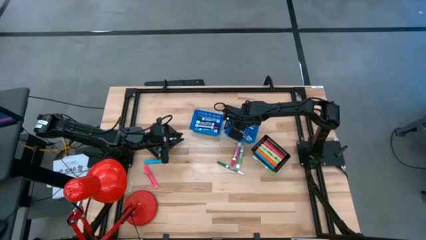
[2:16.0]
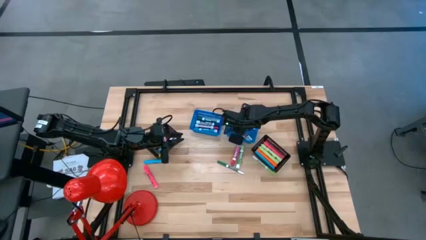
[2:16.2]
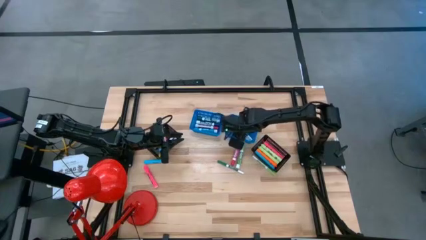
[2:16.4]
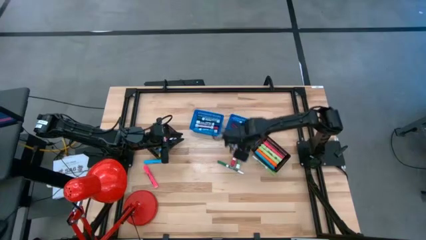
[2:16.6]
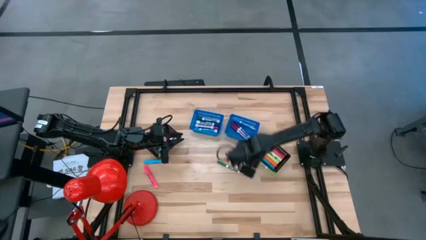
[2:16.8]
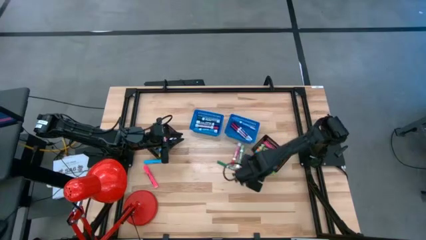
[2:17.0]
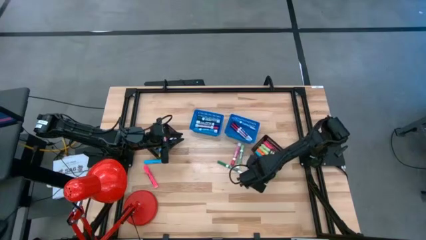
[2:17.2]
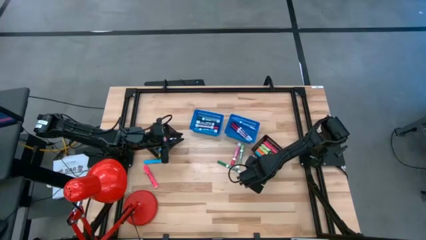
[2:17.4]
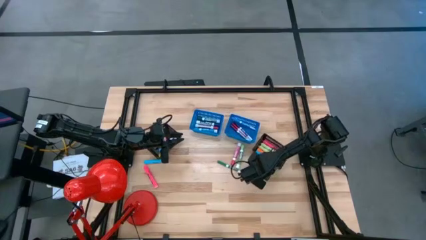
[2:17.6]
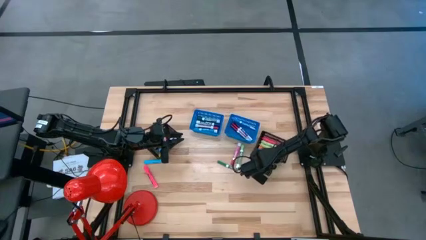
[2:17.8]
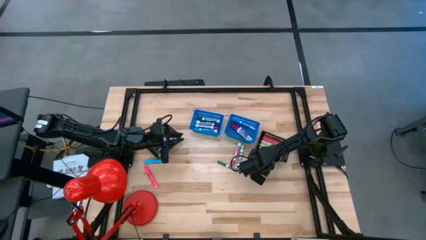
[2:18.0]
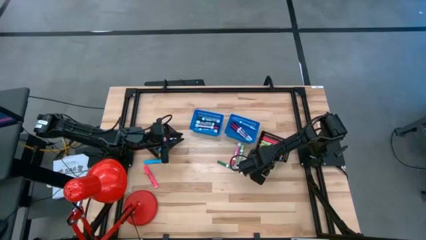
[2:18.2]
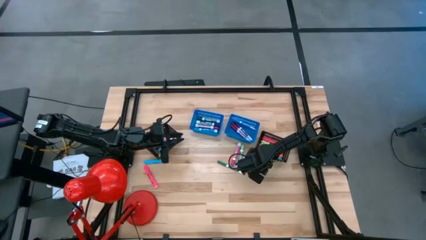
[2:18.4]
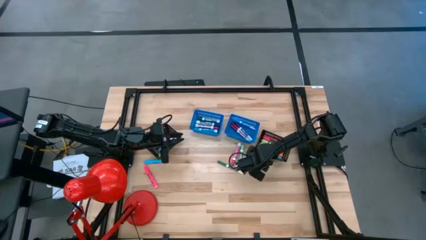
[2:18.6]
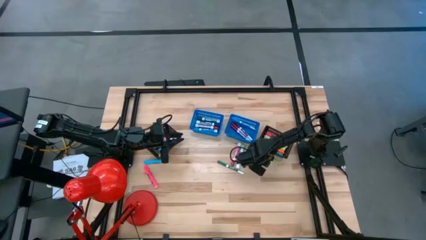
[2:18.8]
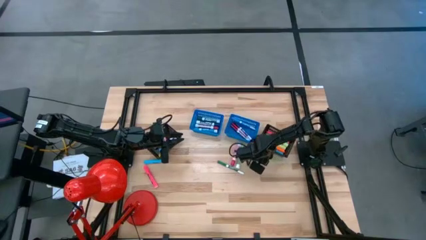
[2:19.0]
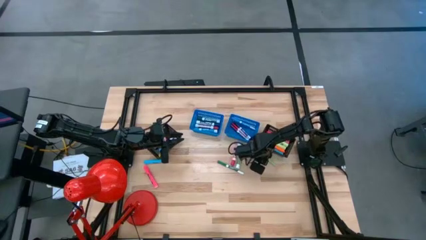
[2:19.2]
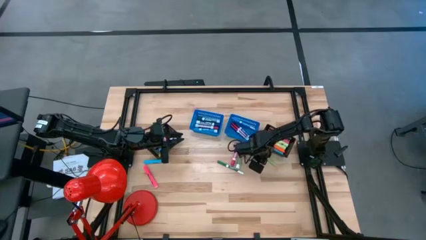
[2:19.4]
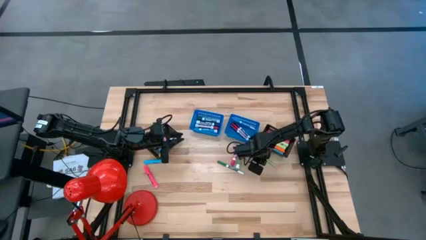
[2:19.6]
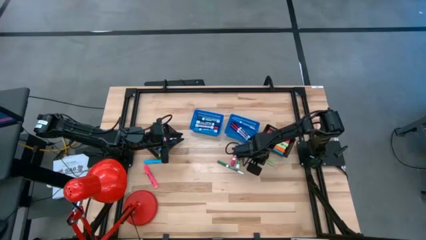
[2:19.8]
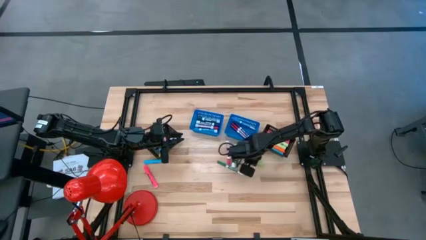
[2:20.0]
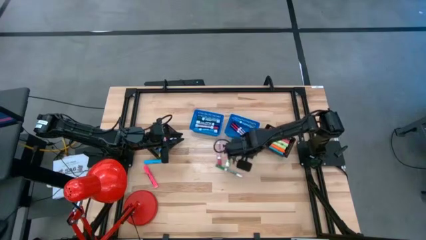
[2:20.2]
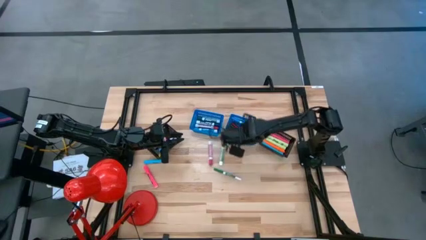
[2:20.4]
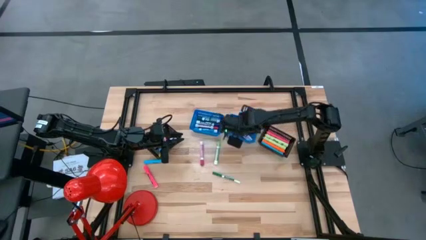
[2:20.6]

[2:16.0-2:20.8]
Task: Pick & Place Markers
Put the light green alcohol marker into the right blue bin

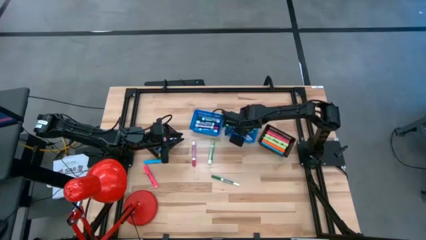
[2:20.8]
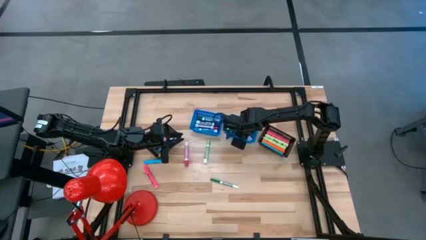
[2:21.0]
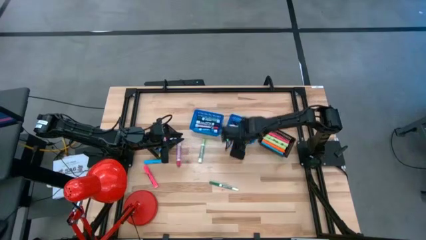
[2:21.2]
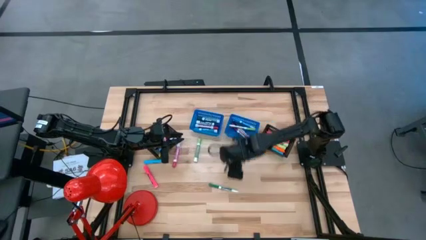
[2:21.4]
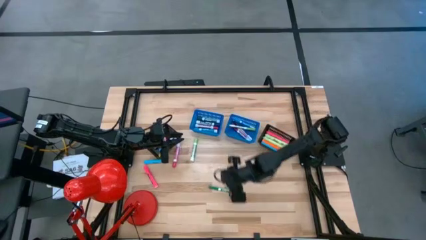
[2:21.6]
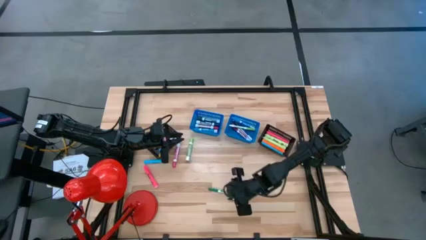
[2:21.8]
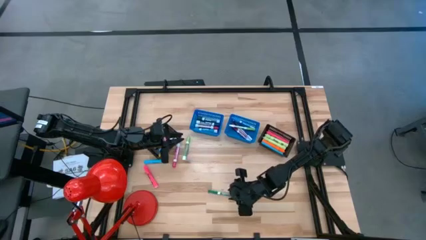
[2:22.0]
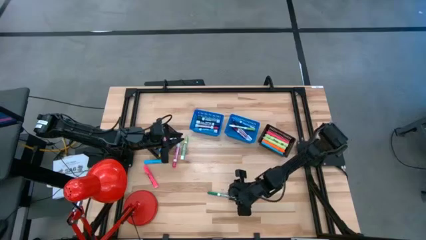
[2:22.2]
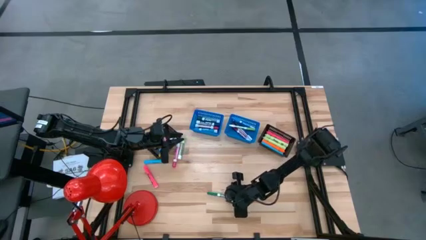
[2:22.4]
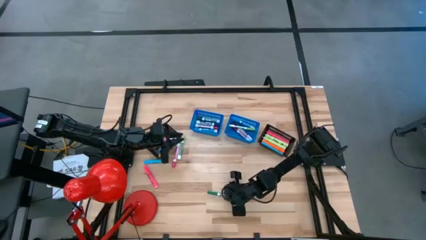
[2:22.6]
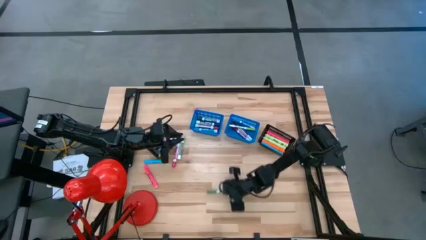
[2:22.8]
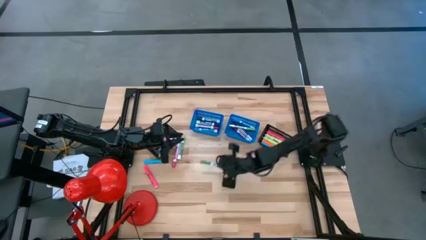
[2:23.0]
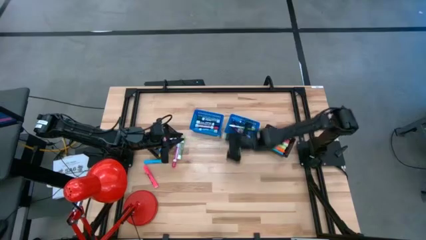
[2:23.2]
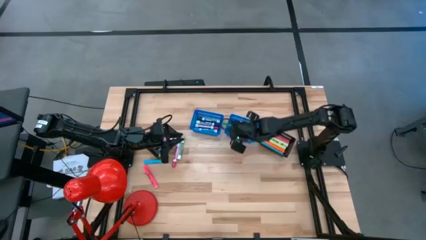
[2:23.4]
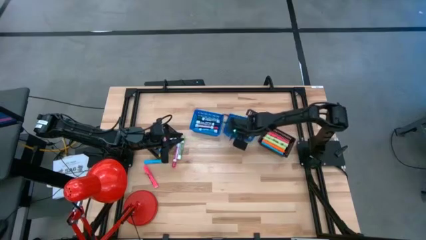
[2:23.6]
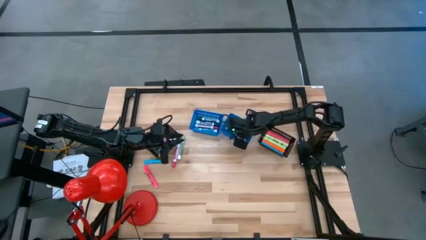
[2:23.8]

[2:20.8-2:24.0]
Put the dark green alcohol marker into the right blue bin

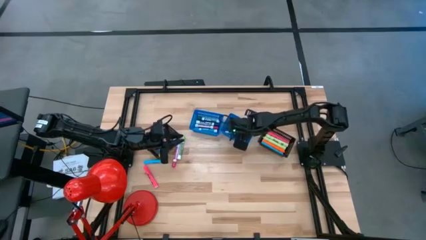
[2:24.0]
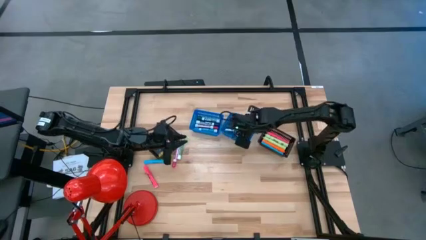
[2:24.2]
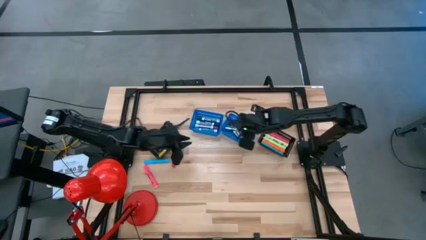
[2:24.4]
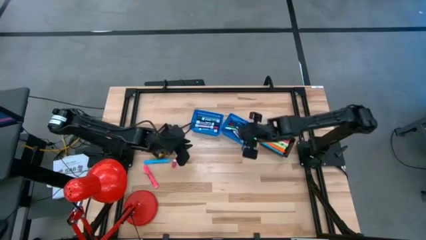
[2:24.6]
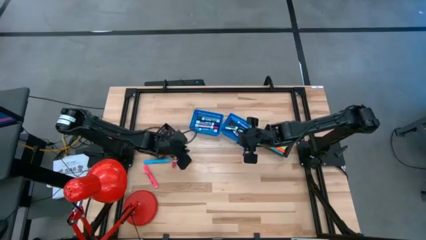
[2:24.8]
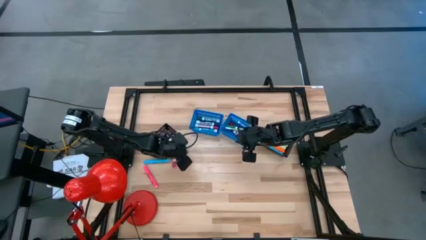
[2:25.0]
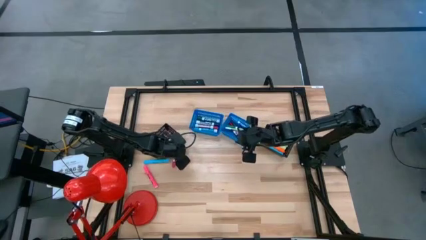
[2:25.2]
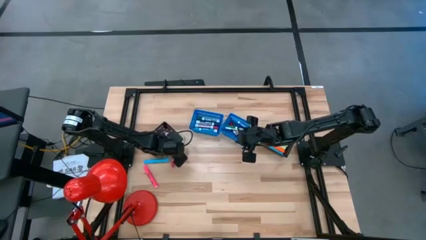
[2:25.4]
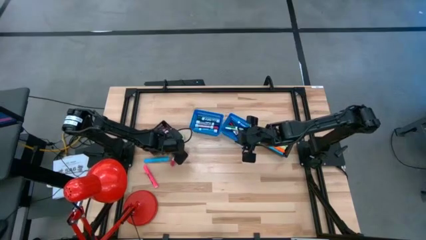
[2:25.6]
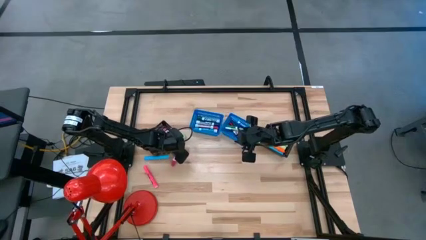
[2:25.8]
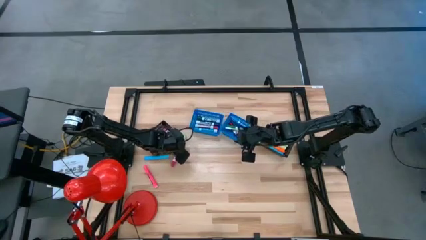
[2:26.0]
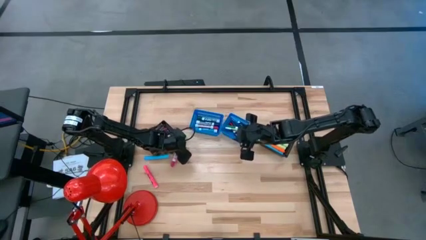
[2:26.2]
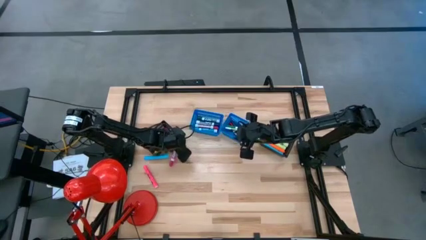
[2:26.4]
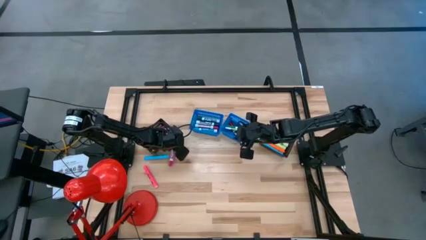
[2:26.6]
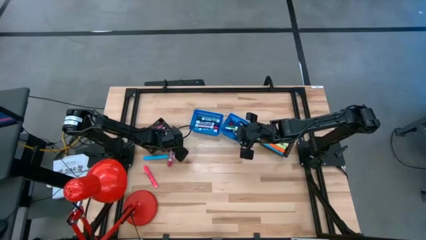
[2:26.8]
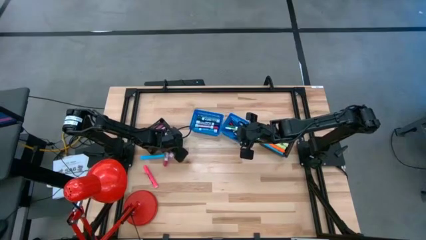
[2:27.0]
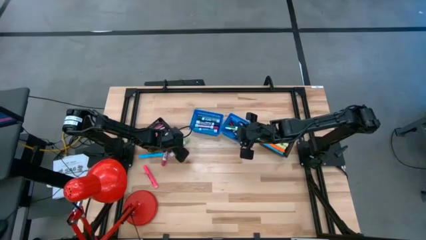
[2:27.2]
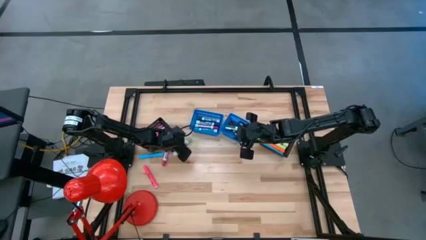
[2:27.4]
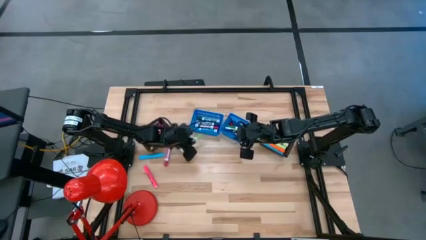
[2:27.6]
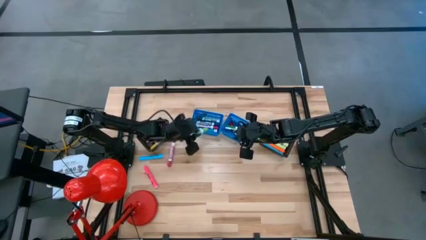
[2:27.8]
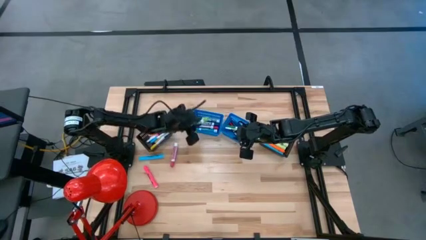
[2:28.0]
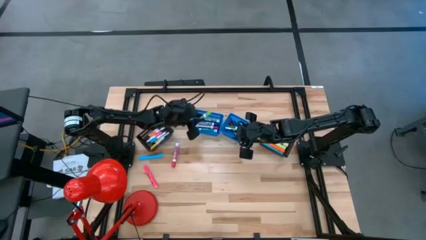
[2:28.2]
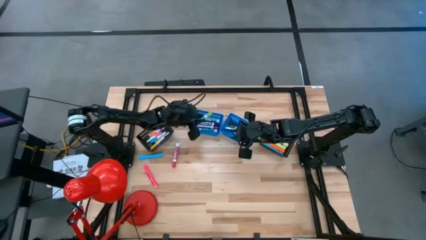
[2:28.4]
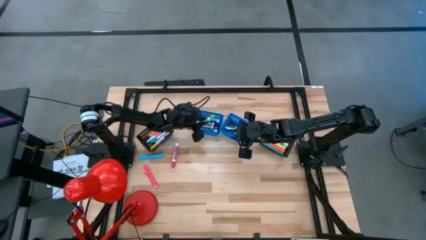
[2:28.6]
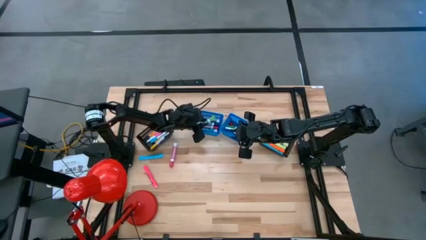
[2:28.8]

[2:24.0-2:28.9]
Put the light green solvent marker into the left blue bin

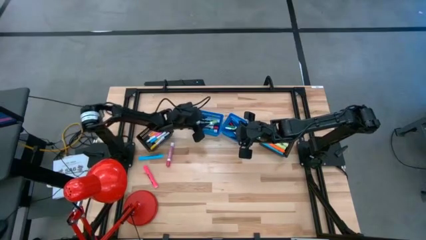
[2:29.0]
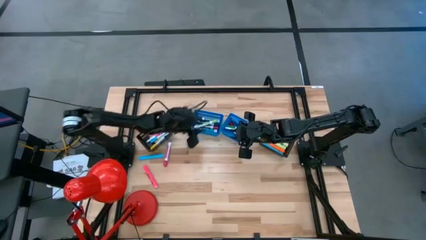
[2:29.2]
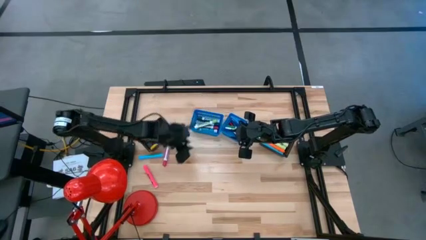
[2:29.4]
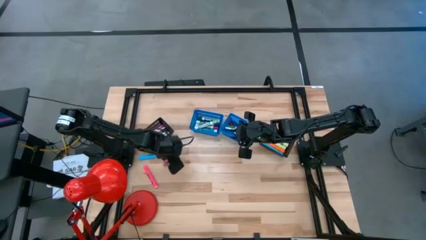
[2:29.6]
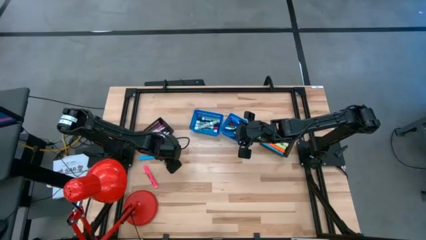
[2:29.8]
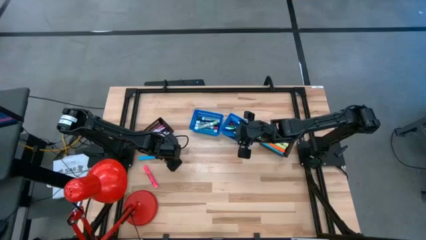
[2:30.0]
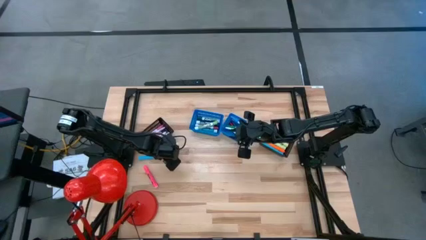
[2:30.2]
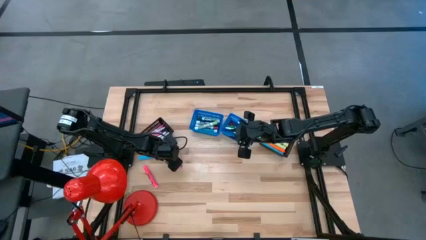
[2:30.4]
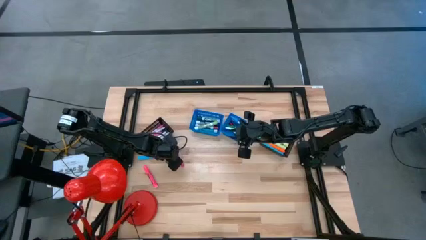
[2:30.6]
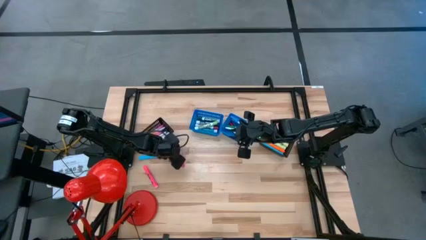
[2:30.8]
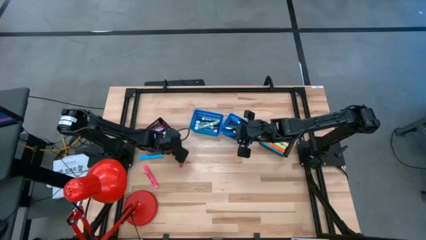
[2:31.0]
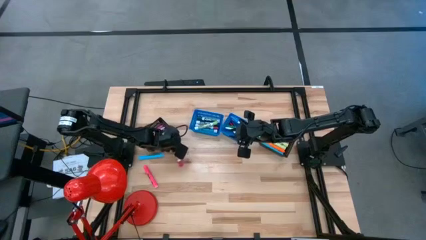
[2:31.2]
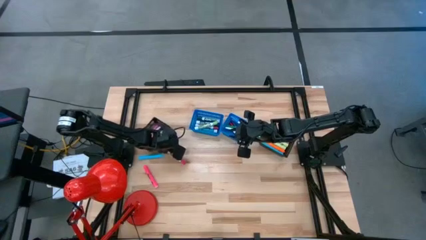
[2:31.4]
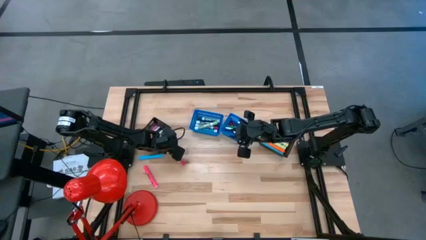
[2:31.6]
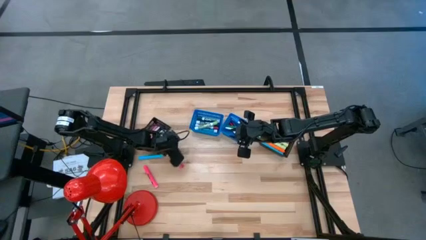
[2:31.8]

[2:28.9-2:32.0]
Put the pink solvent marker into the left blue bin

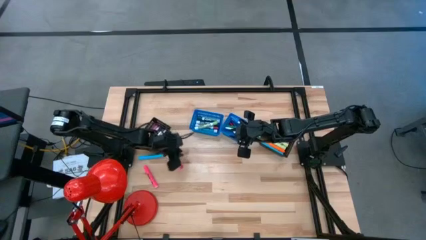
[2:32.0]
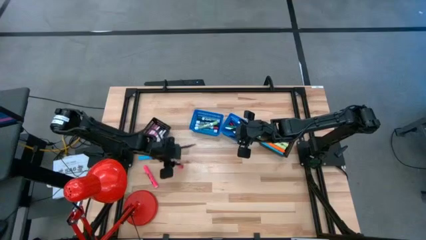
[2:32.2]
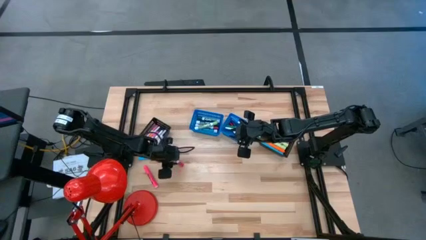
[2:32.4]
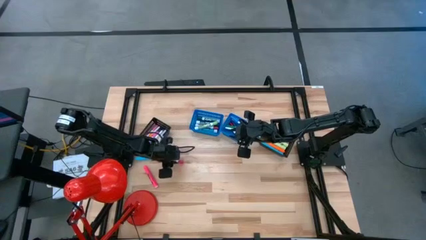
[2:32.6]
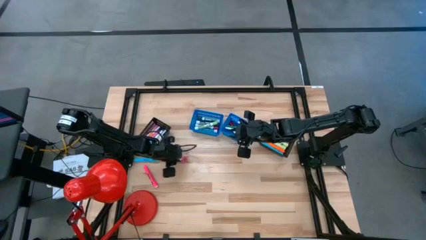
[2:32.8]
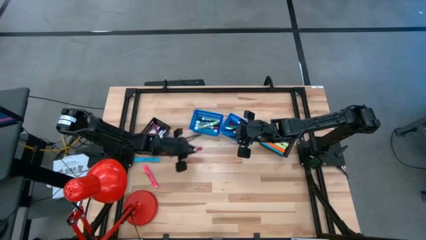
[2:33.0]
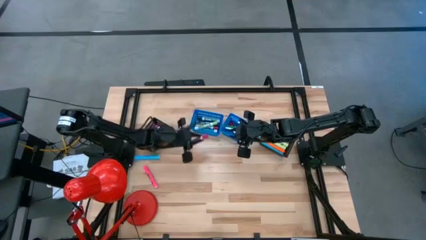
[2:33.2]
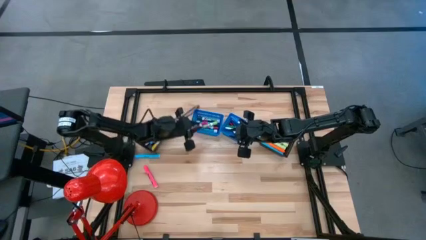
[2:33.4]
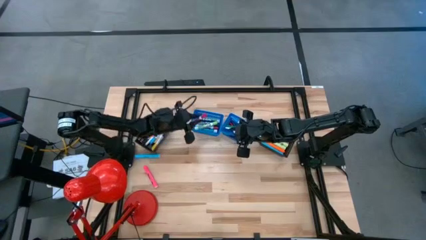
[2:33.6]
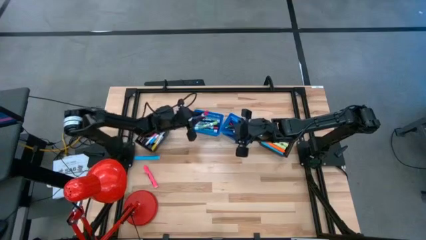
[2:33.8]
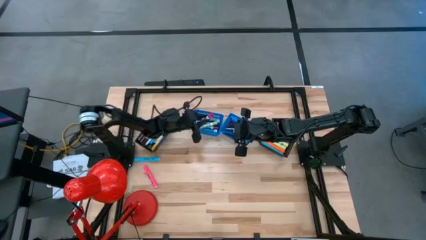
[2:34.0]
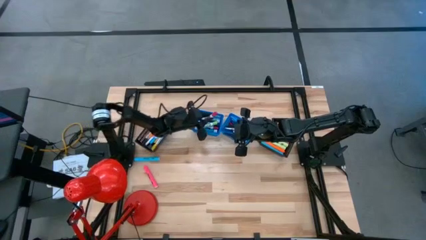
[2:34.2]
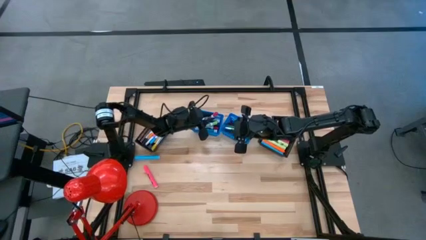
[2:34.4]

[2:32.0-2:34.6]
Put the pink solvent marker into the left blue bin
